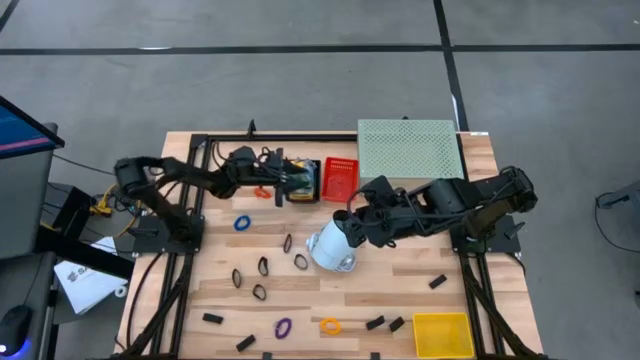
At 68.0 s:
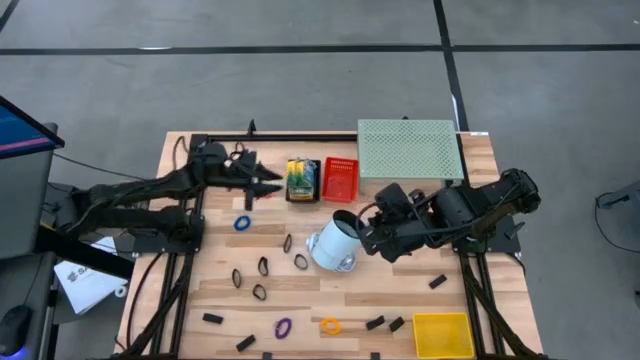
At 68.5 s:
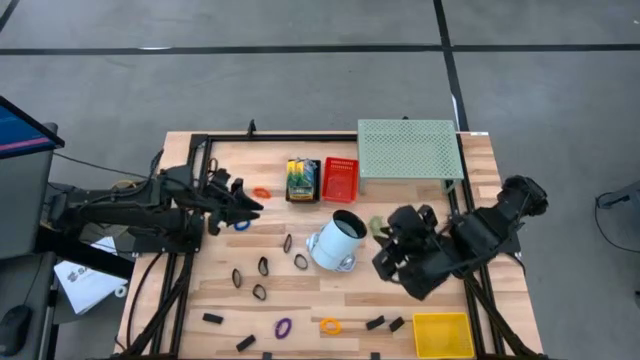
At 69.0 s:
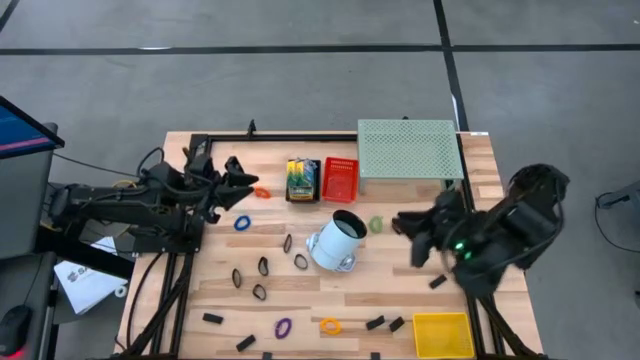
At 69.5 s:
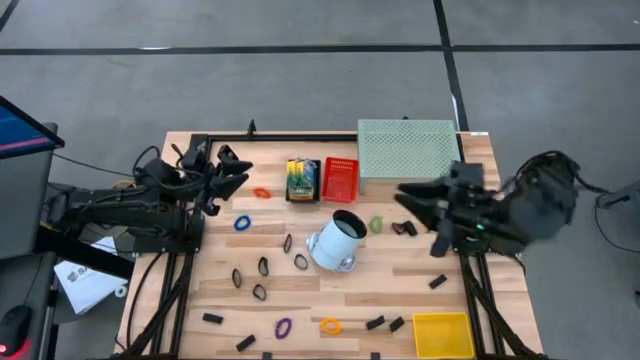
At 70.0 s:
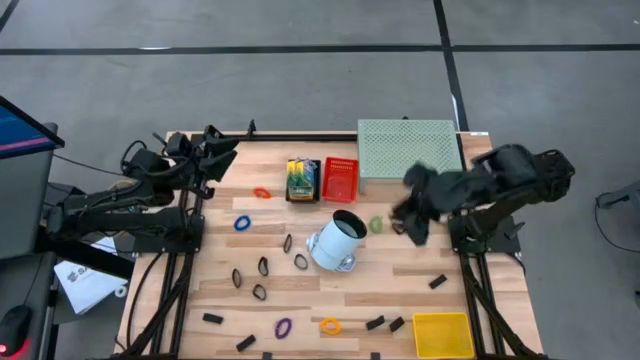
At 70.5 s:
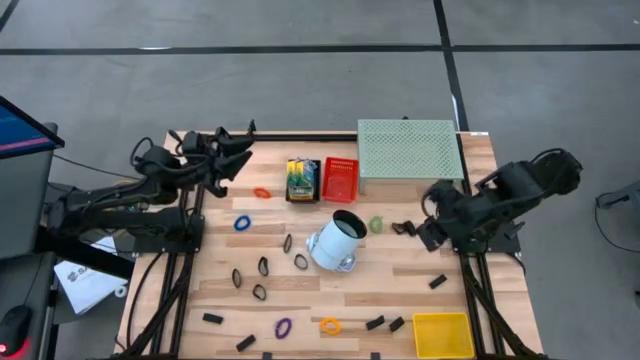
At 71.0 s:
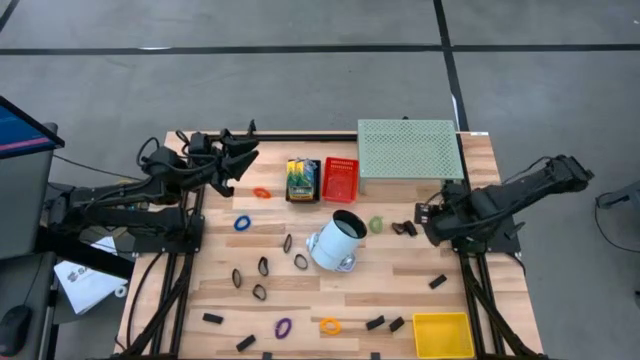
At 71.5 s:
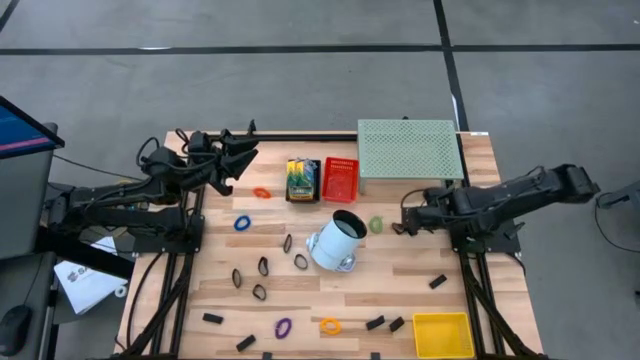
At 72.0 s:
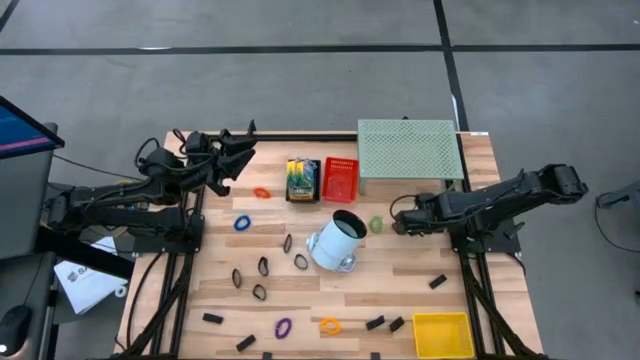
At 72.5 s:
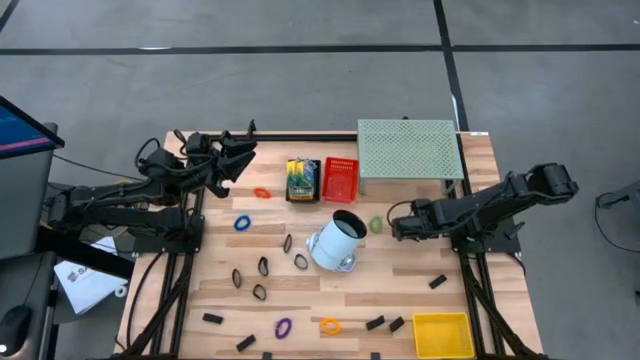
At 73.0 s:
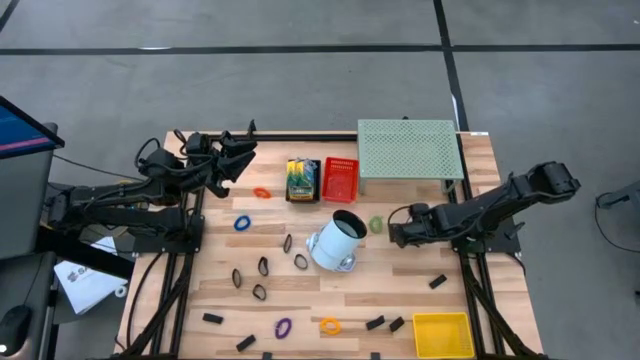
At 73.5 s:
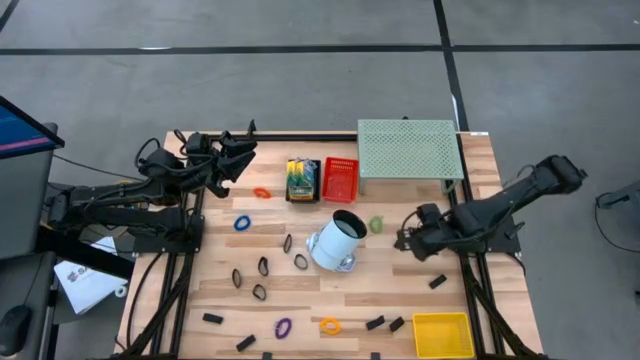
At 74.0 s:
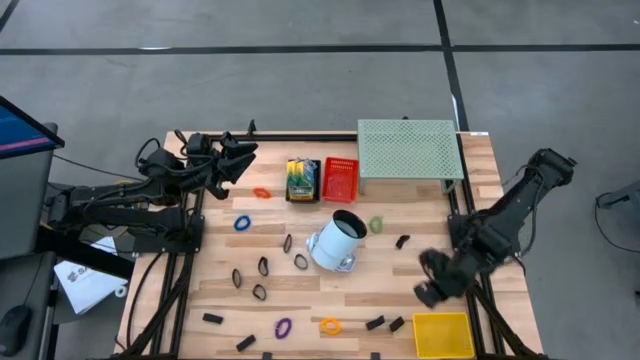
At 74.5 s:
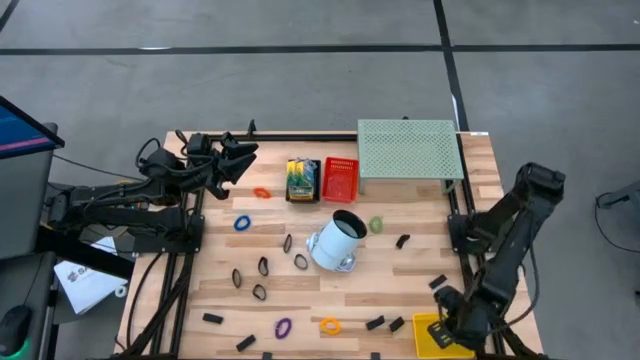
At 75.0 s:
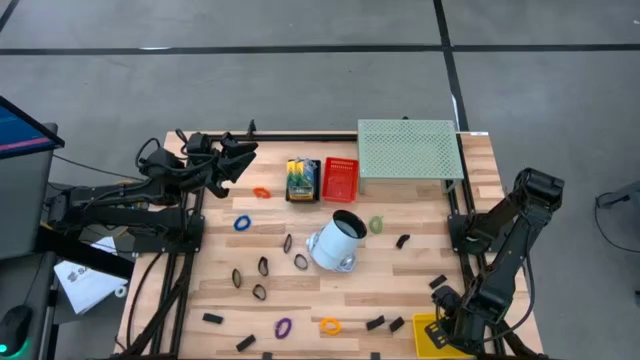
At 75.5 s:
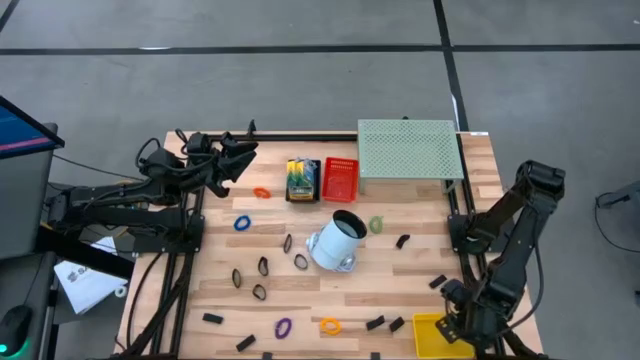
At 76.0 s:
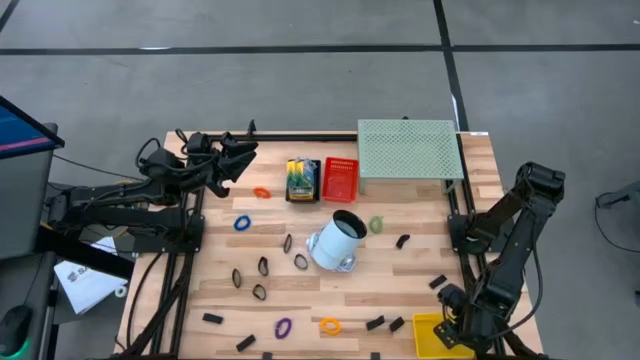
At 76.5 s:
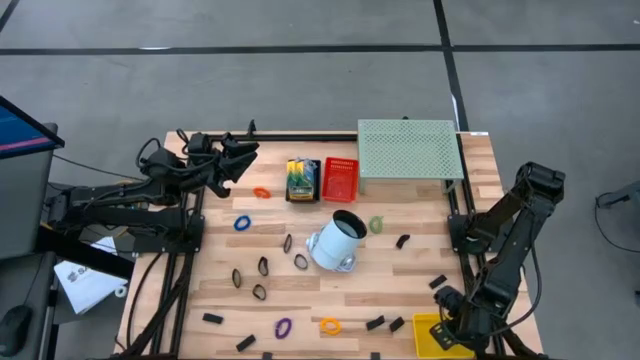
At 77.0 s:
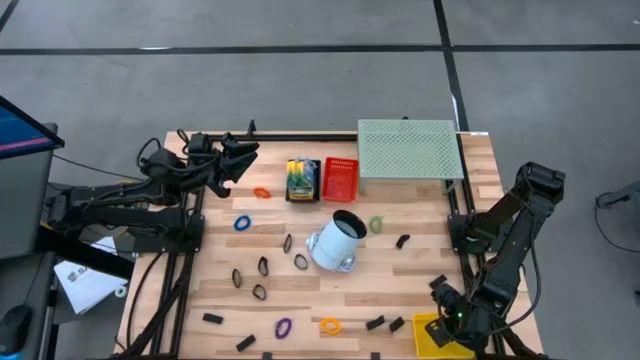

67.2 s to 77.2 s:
Task: Pick & Place Office Desk Supplies
Put the black rubber band into the yellow bin

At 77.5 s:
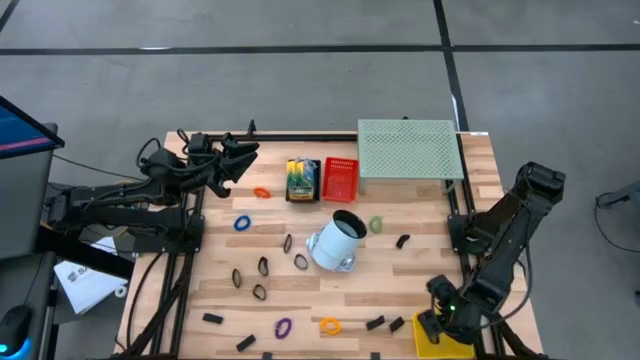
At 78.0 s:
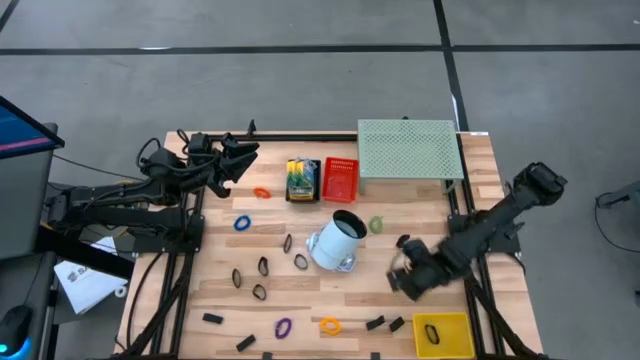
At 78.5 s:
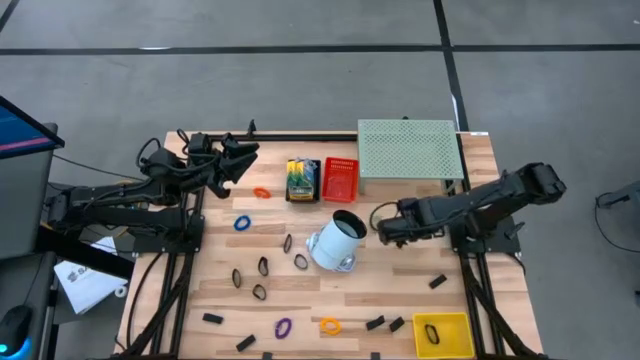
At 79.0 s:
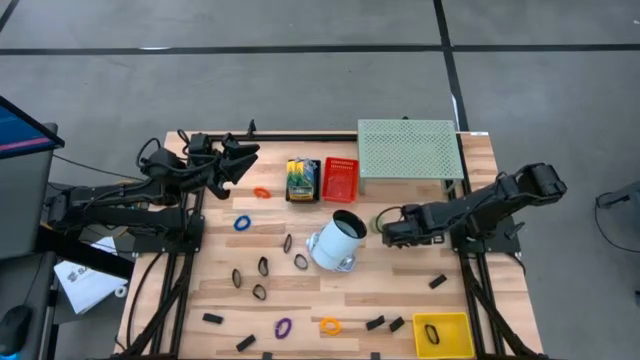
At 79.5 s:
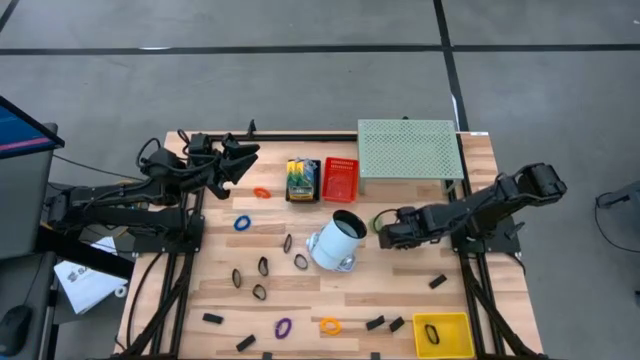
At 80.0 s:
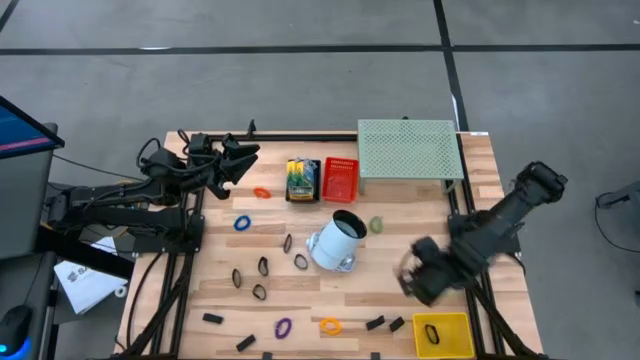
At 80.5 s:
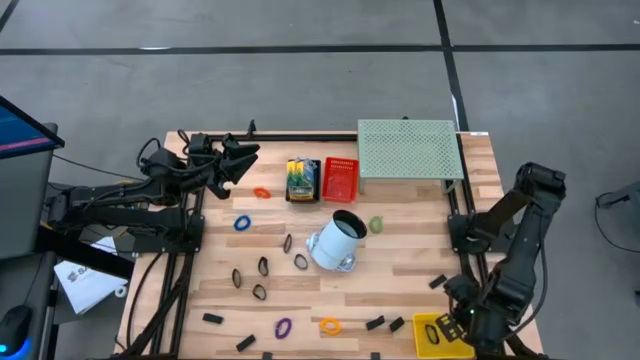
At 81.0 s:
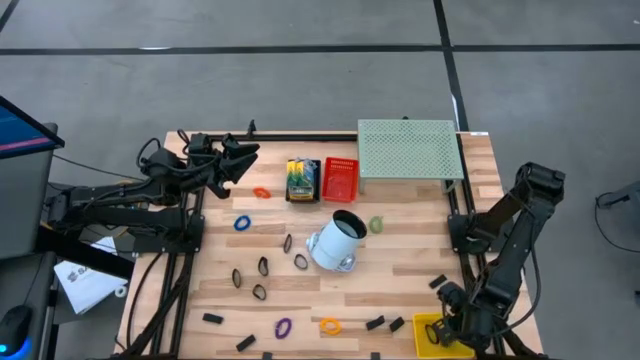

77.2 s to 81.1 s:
Put the black rubber band into the yellow bin

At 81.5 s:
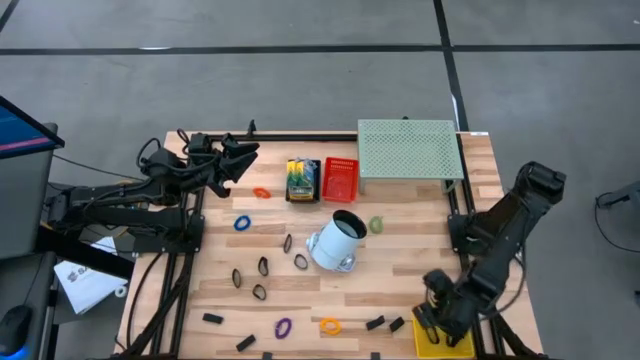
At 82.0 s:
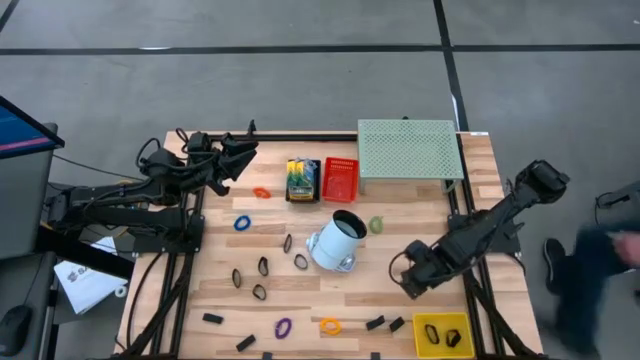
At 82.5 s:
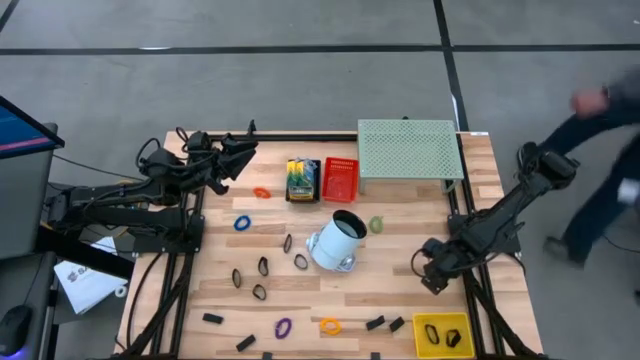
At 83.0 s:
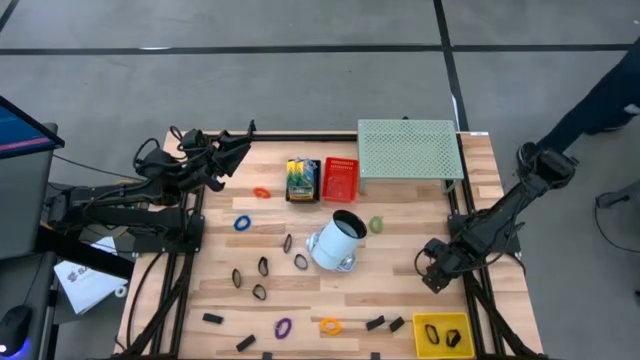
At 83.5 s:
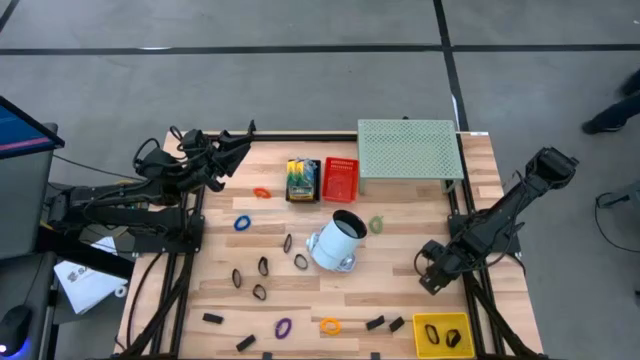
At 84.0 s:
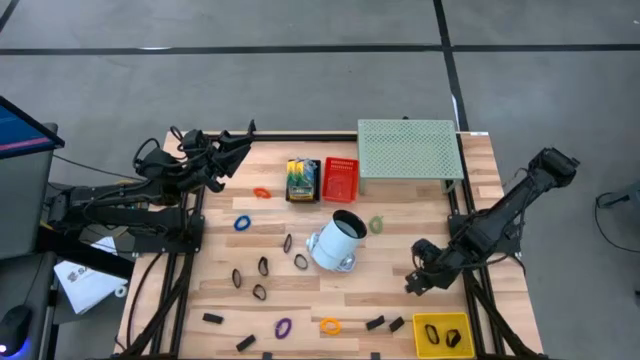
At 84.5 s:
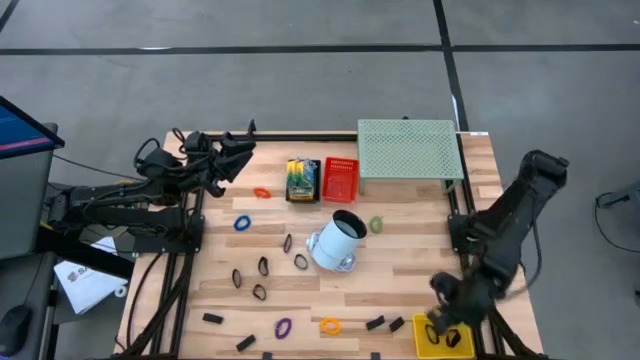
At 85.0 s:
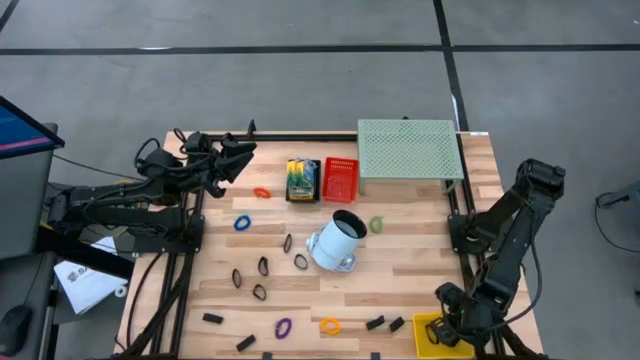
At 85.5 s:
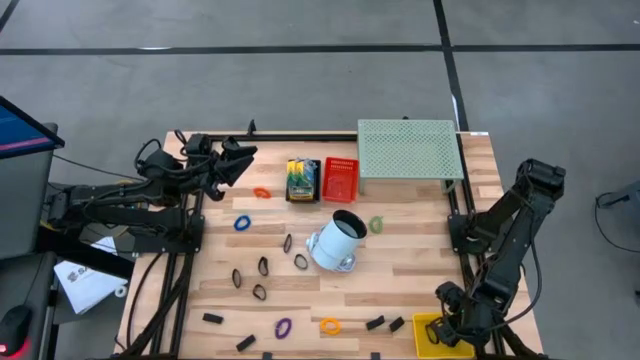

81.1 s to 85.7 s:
Put the black rubber band into the yellow bin

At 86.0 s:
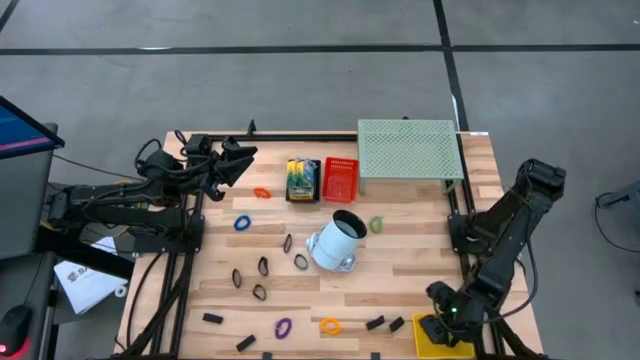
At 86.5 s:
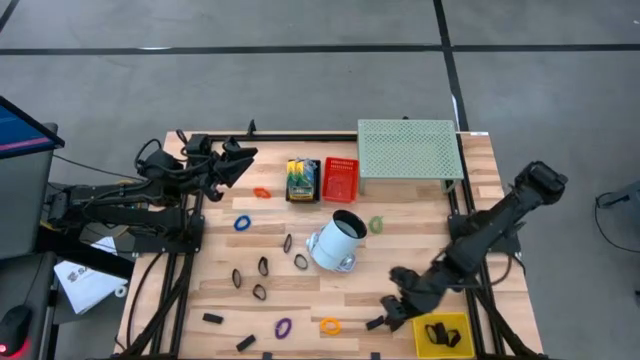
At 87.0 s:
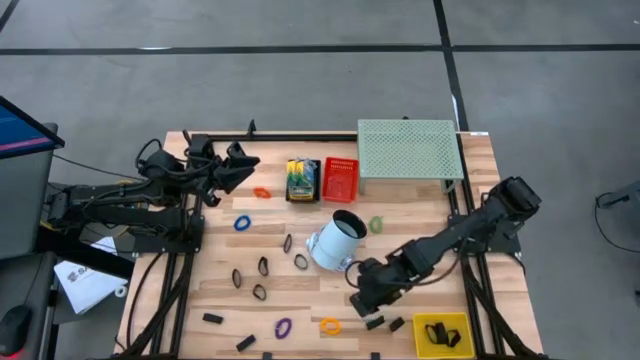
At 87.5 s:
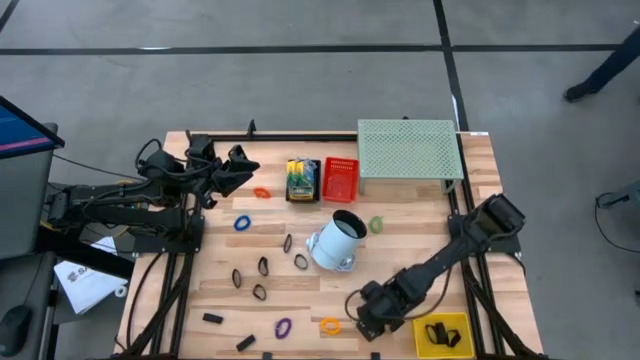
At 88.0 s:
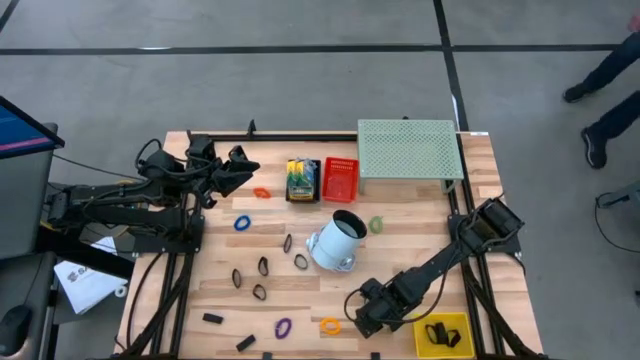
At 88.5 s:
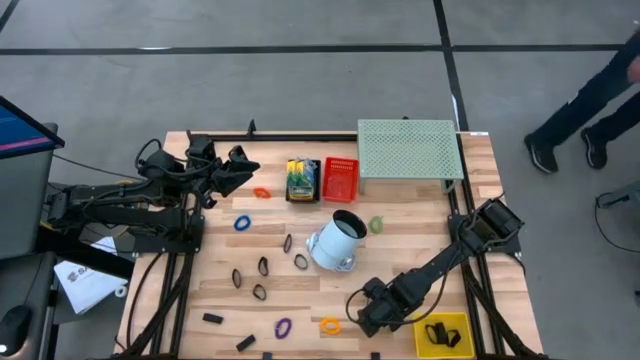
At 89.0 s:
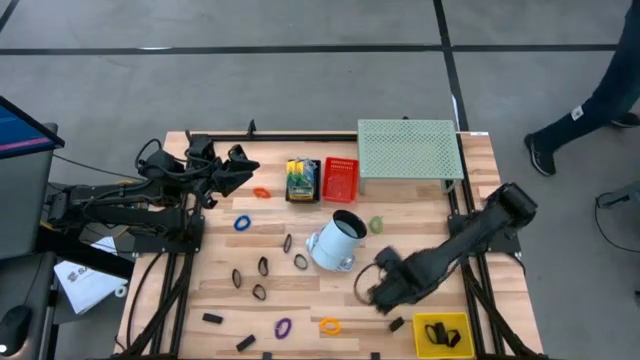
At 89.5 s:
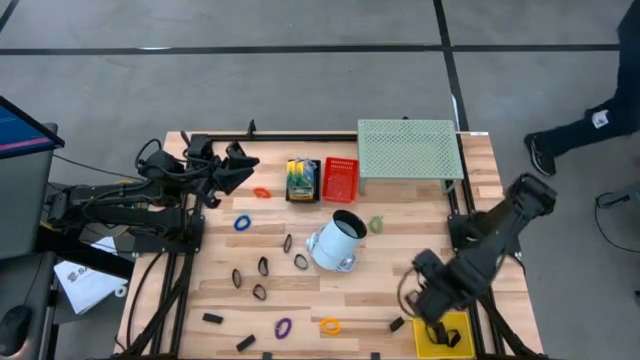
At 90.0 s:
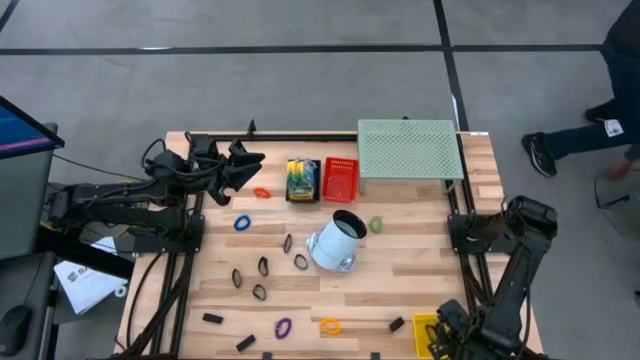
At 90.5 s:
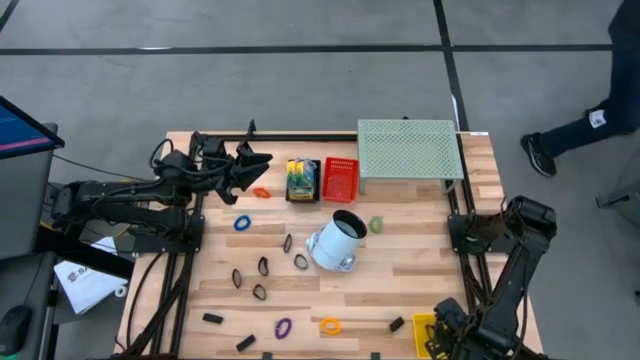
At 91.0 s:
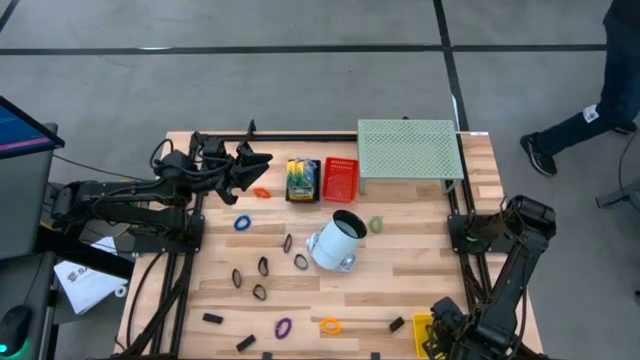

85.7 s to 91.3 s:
Put the black rubber band into the yellow bin
